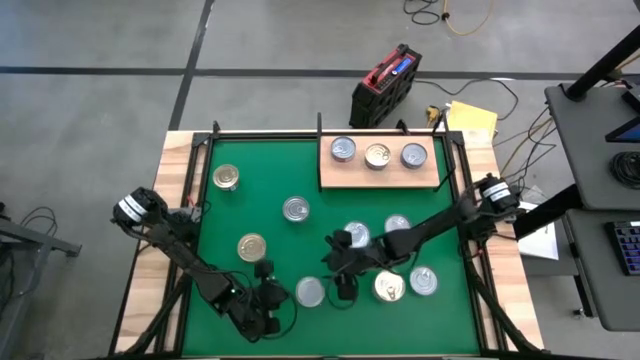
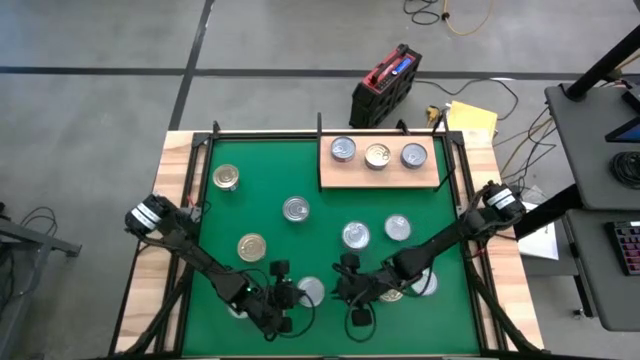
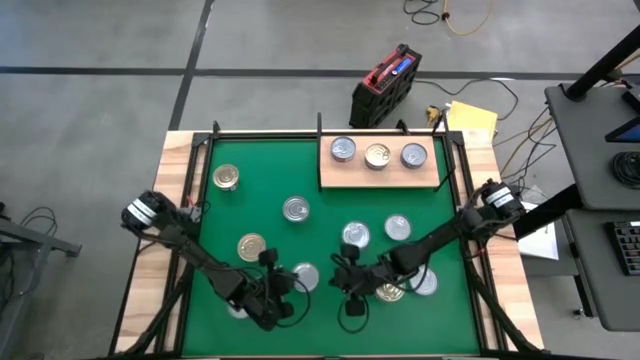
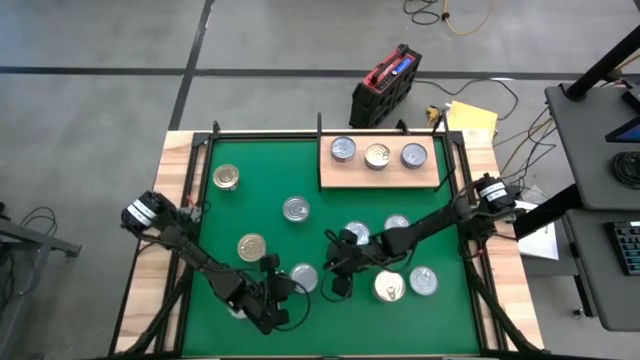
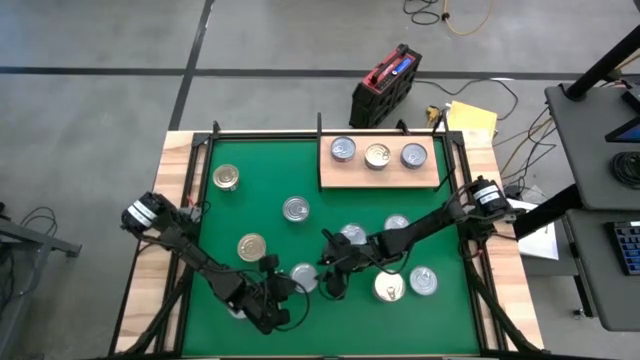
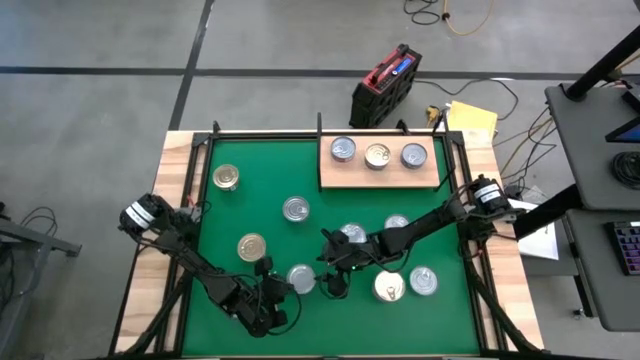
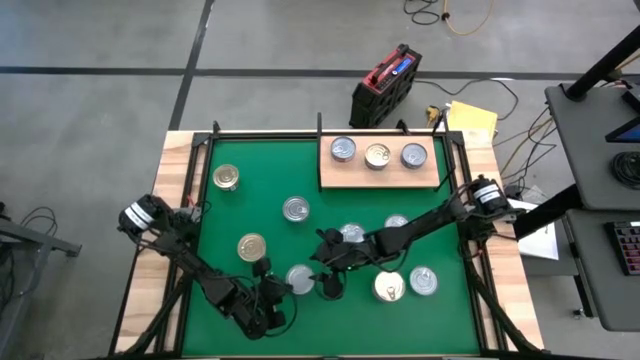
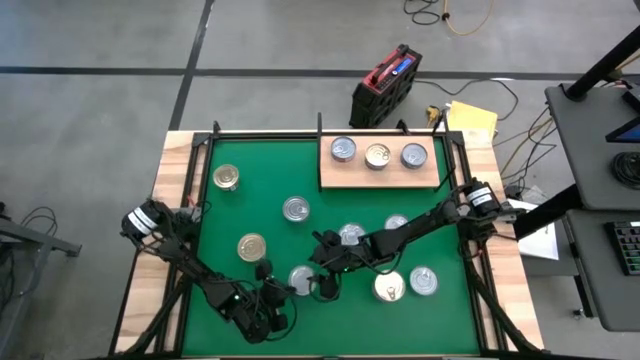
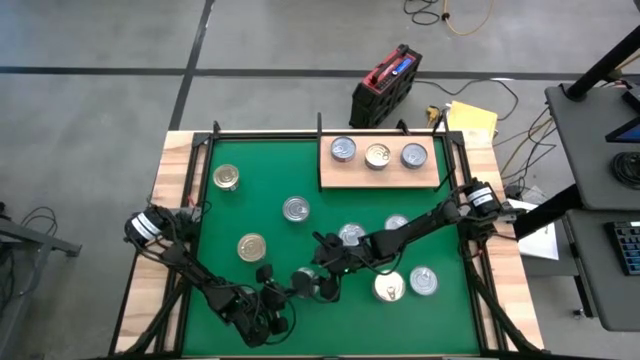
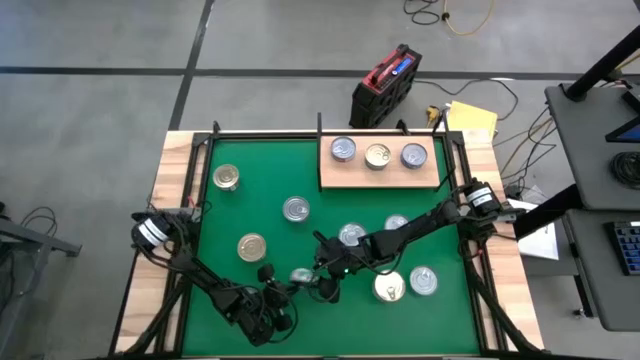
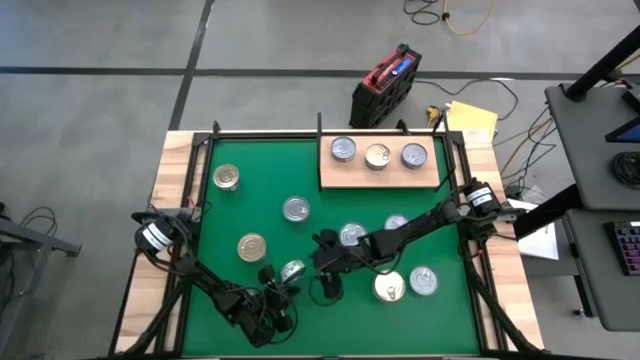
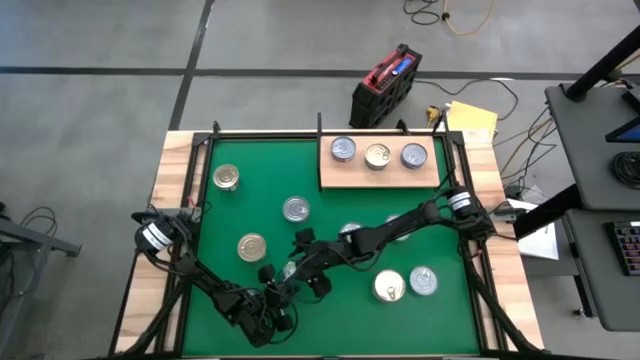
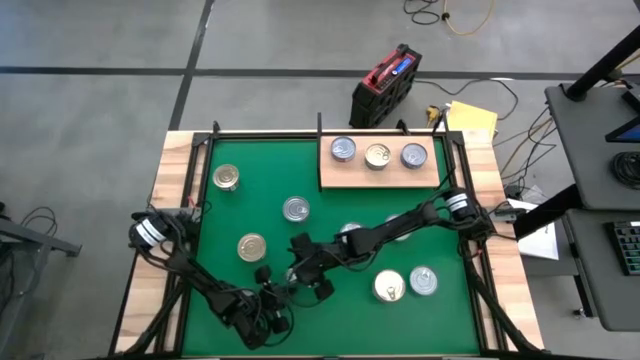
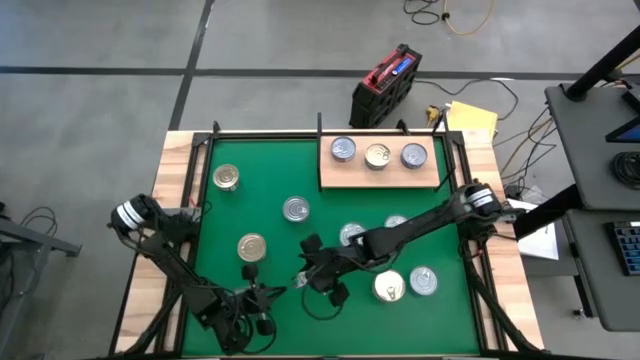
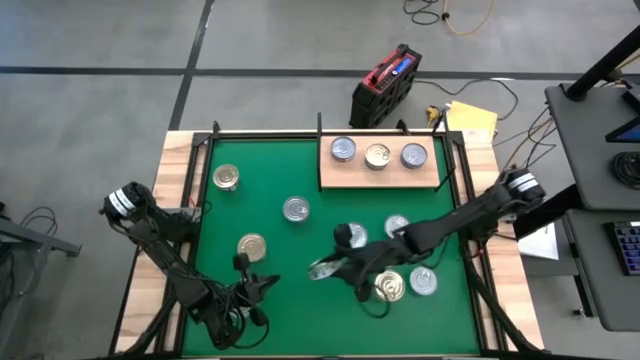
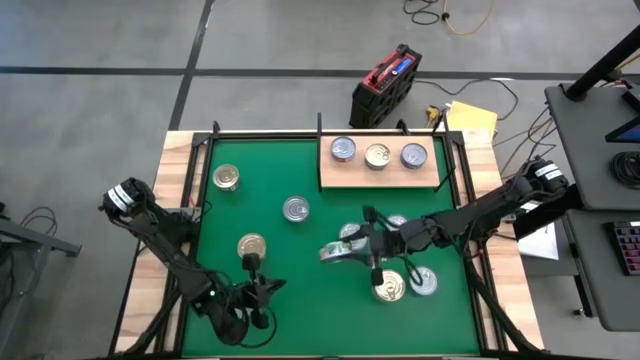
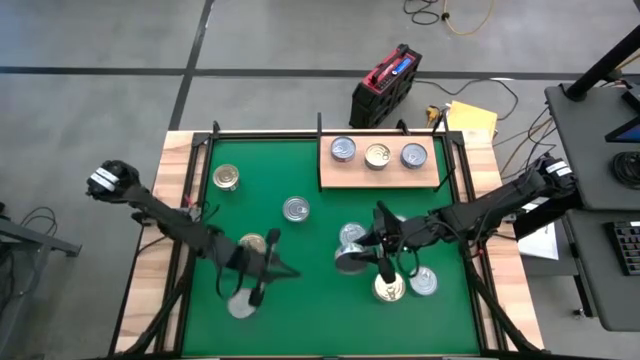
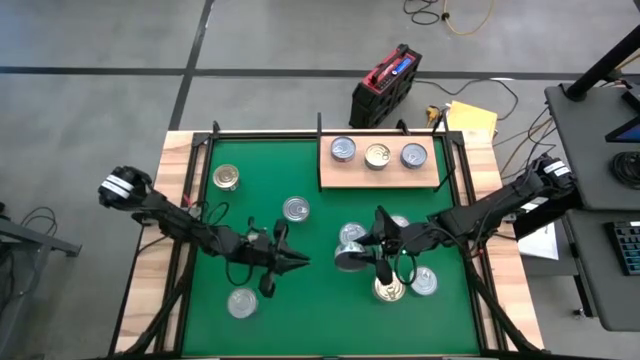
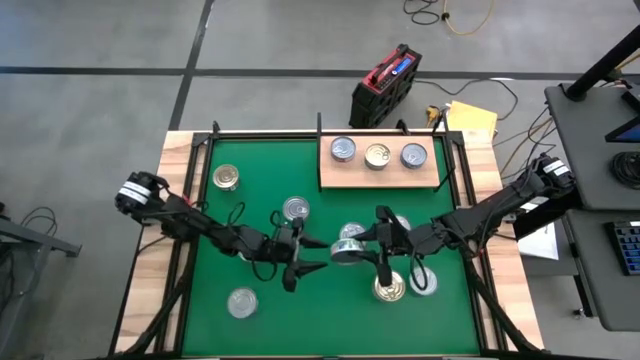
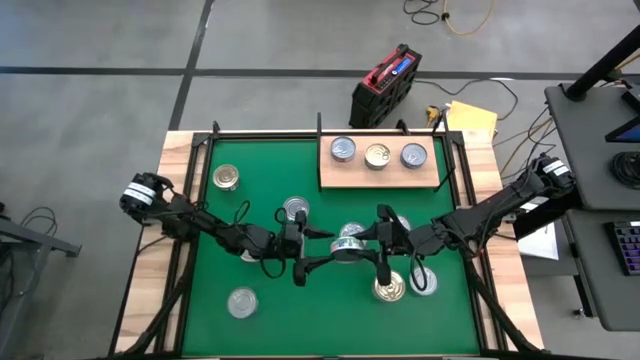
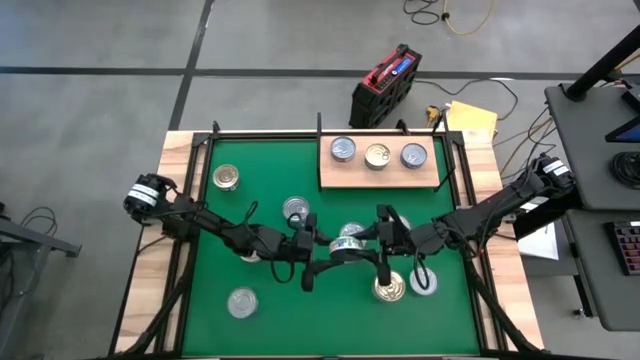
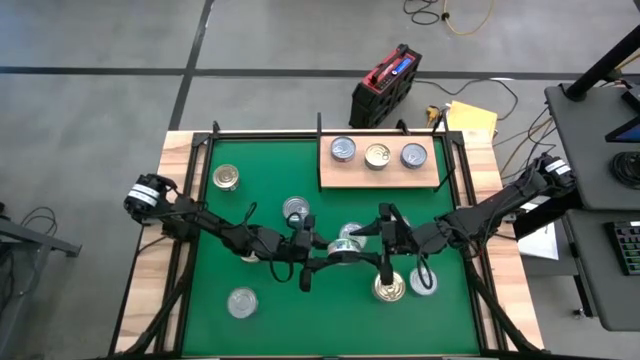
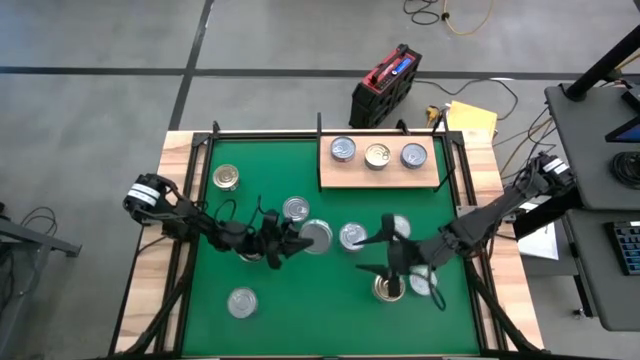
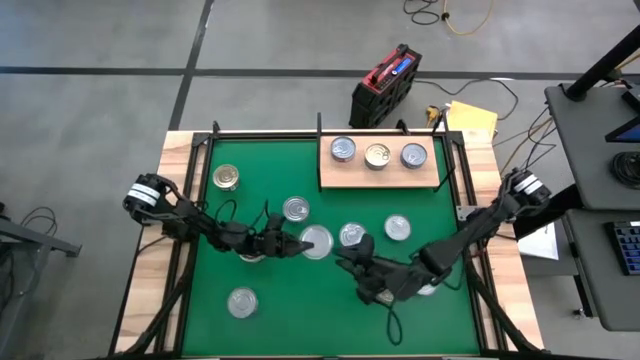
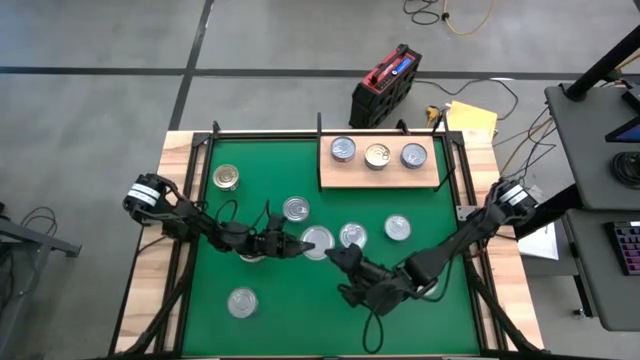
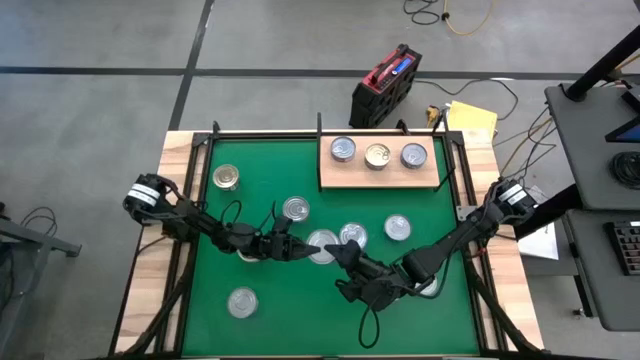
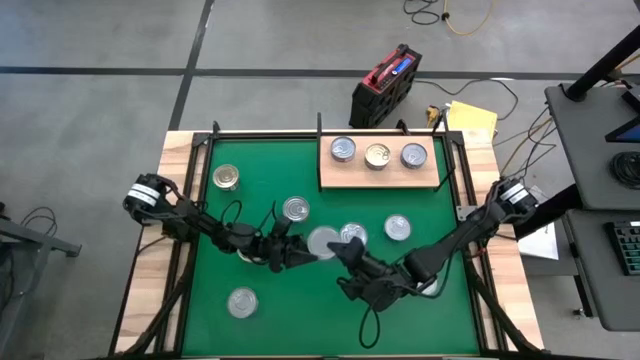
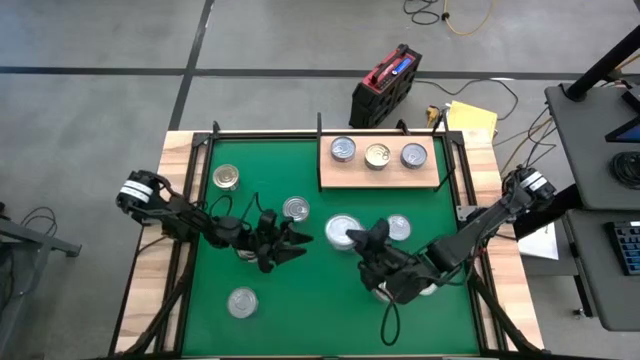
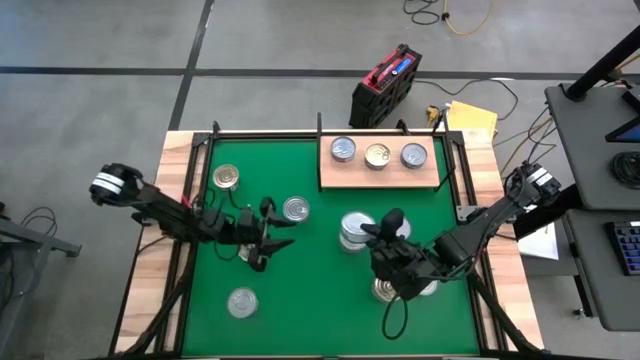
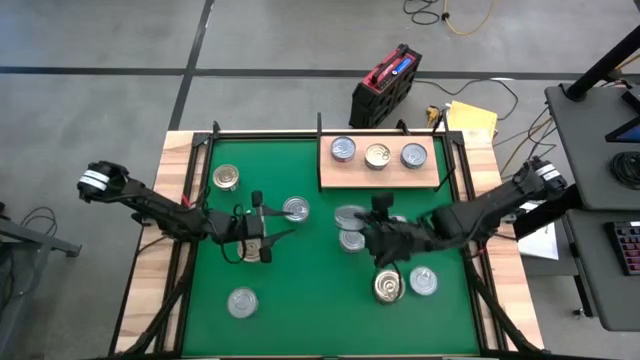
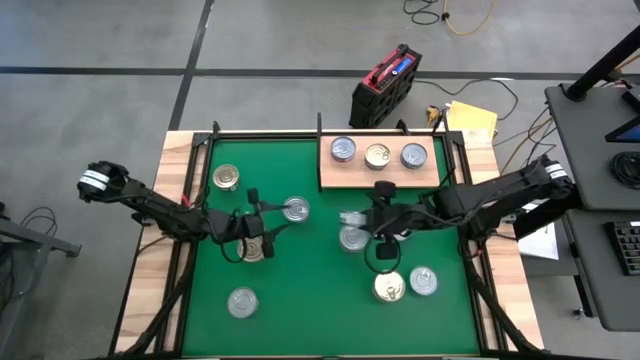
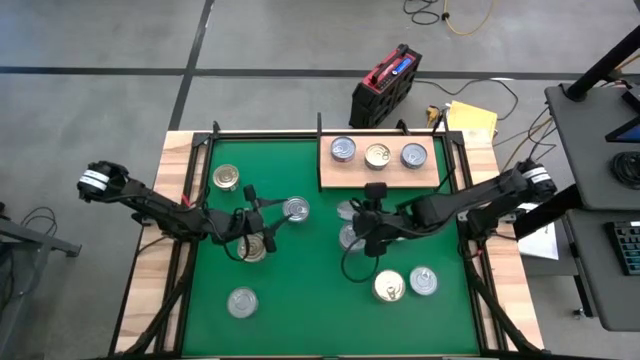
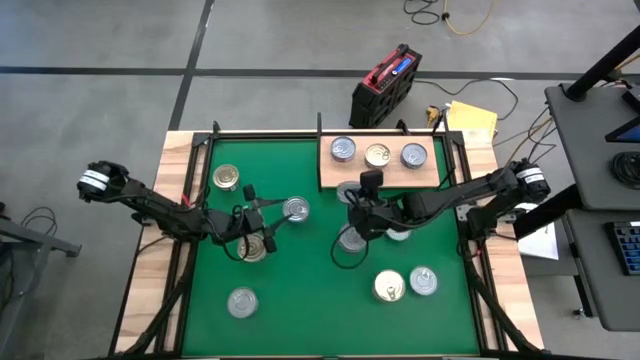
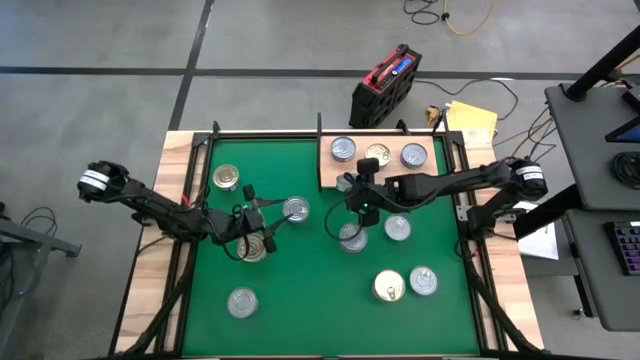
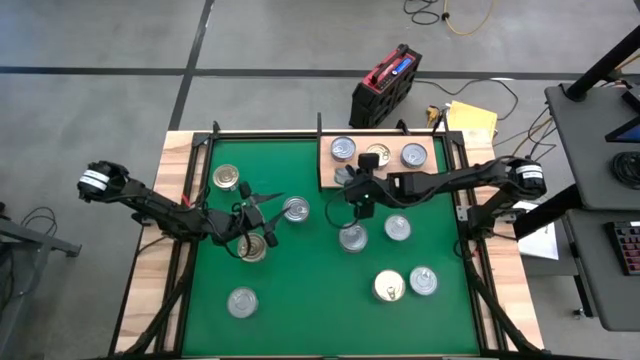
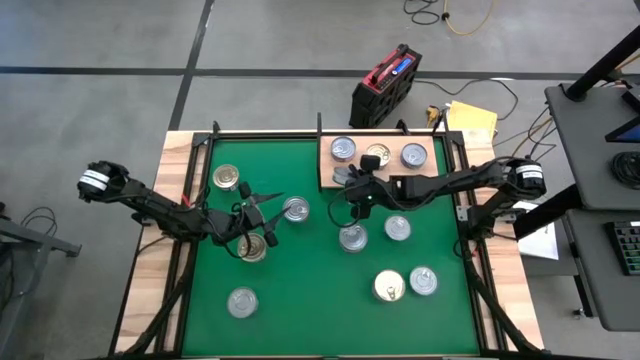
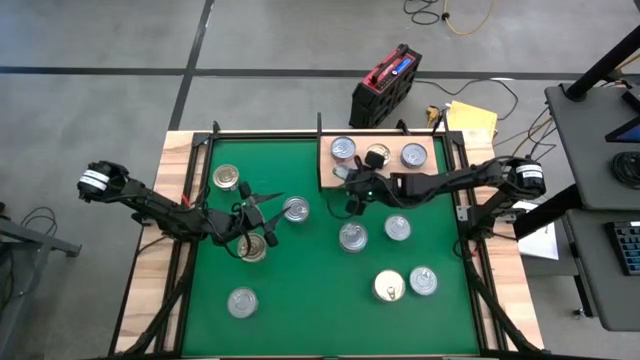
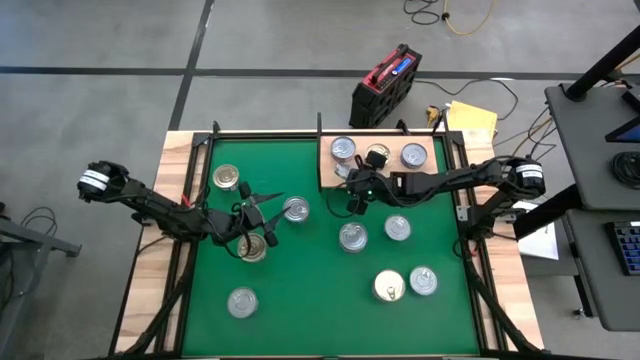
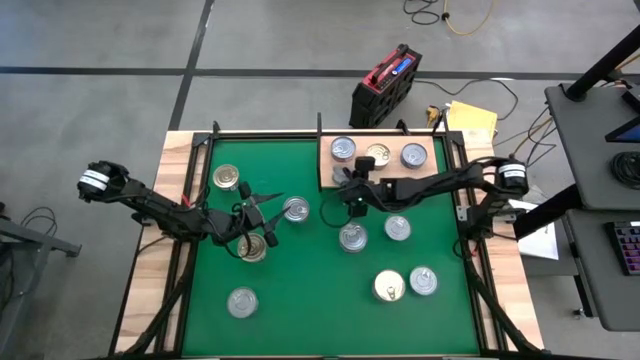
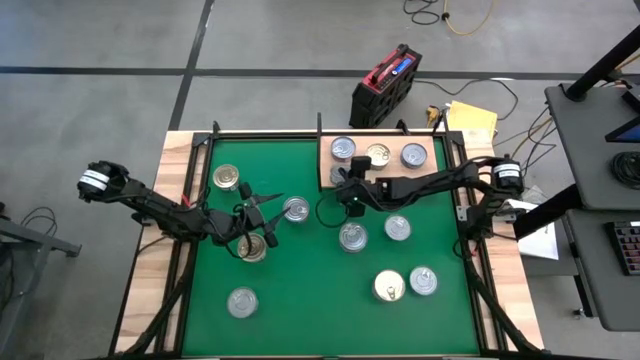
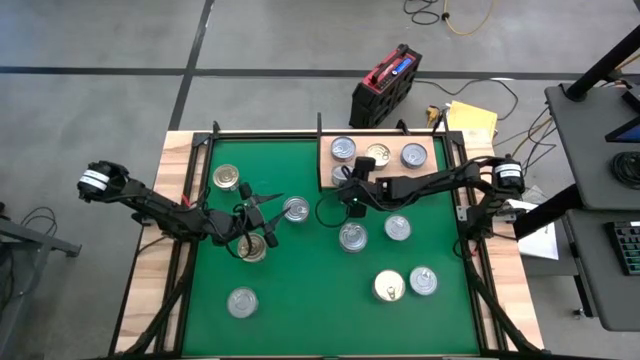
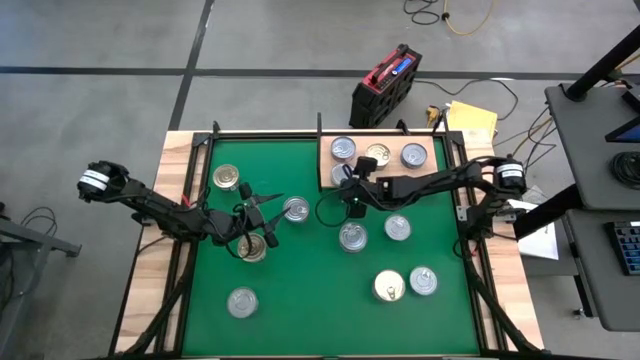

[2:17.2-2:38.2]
Task: Stack canned seafood by type on shelf
Put the green tuna can on the shelf

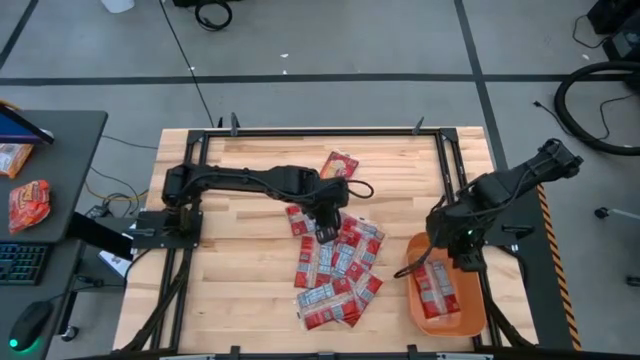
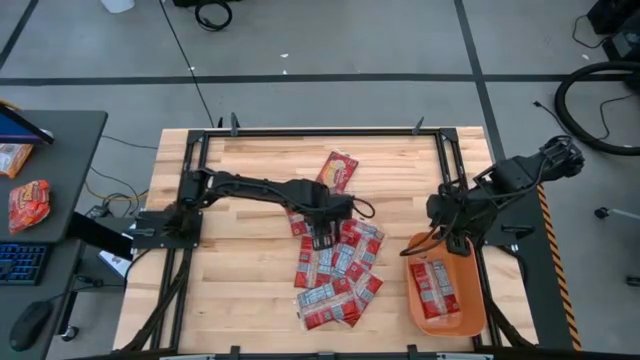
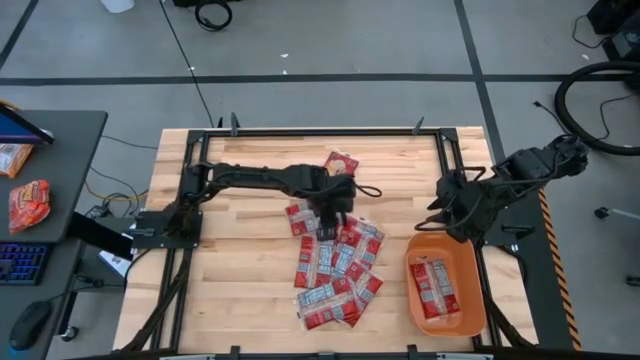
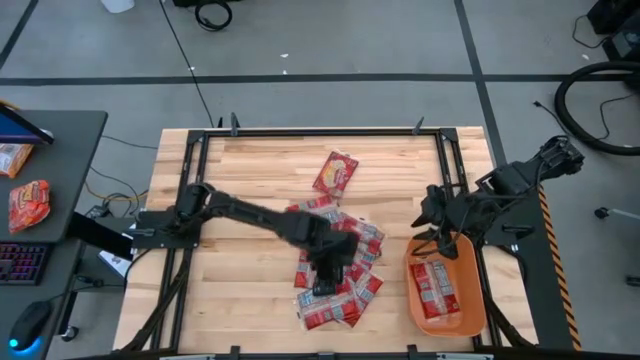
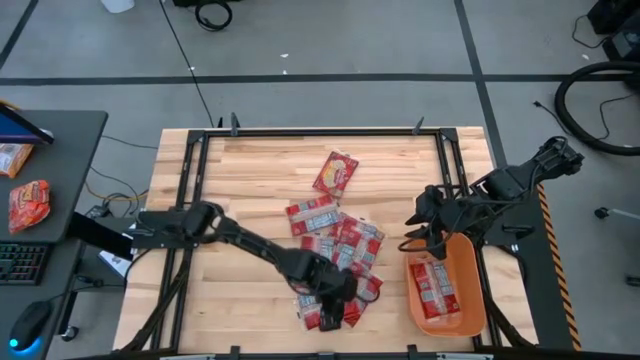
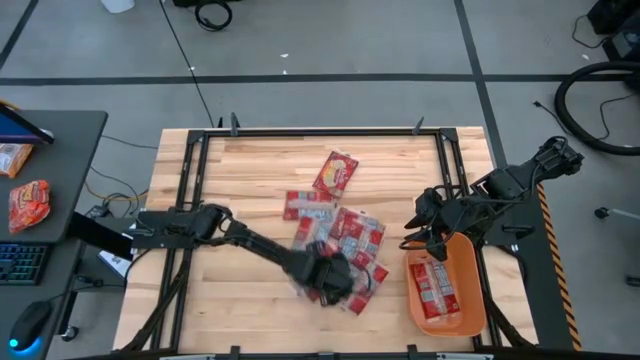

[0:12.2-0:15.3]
Task: Sort popcorn bags into baskets
Adjust the red popcorn bags
